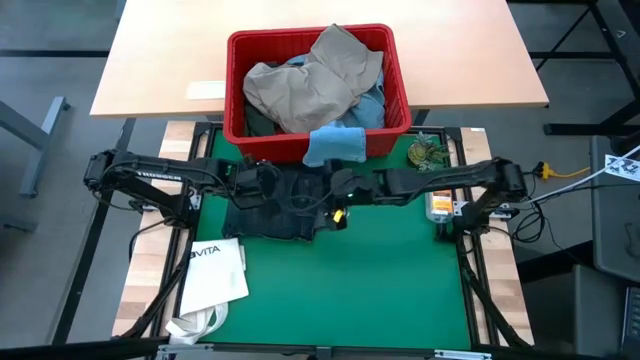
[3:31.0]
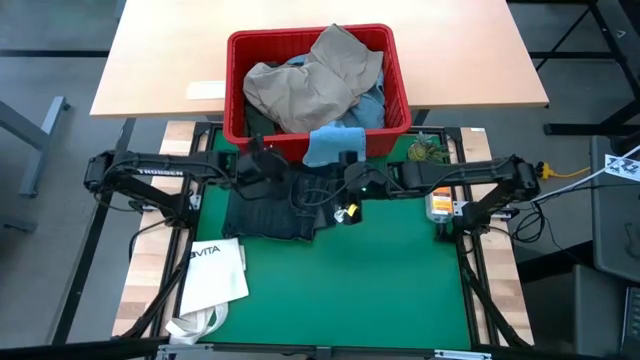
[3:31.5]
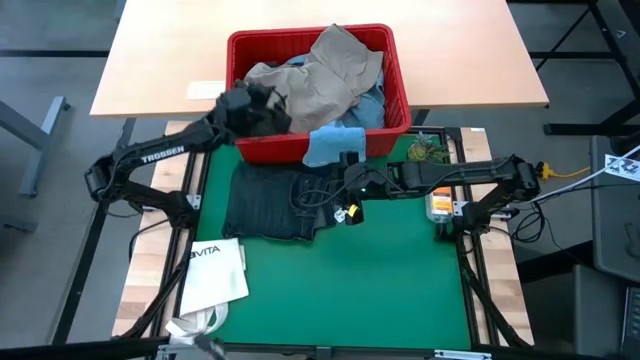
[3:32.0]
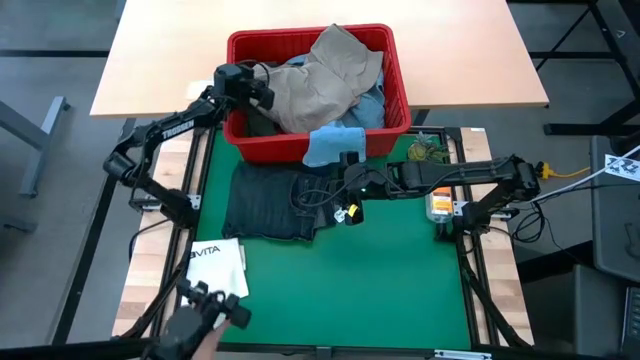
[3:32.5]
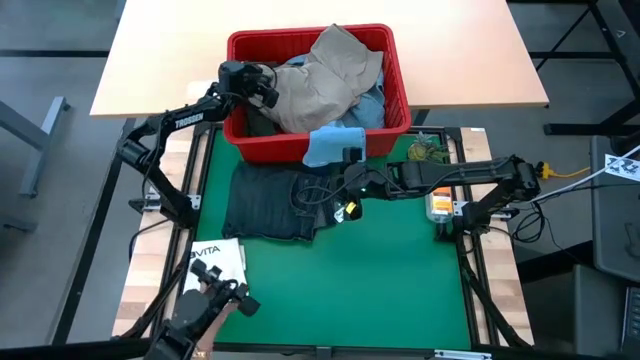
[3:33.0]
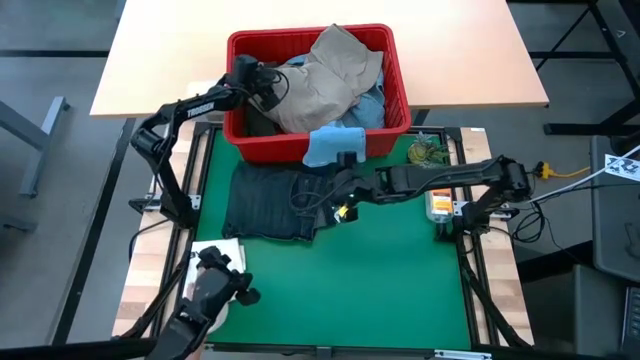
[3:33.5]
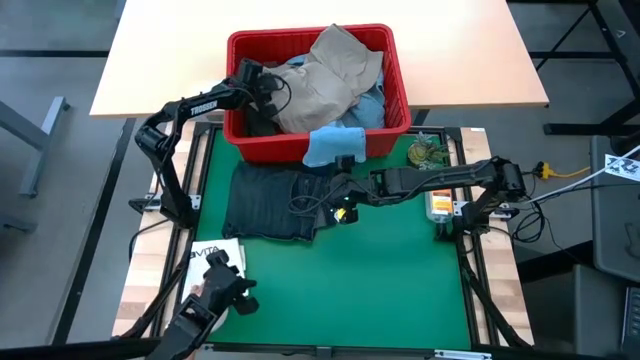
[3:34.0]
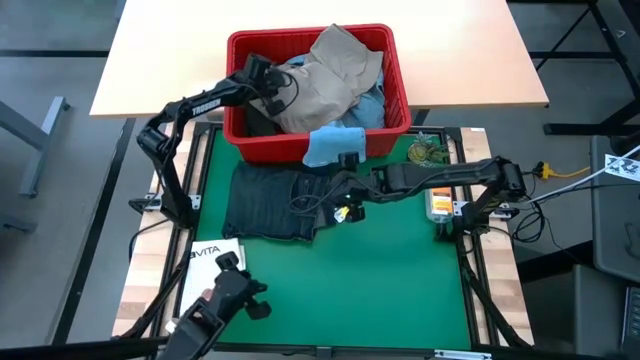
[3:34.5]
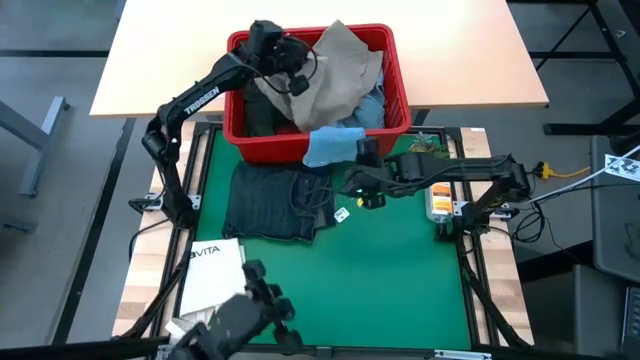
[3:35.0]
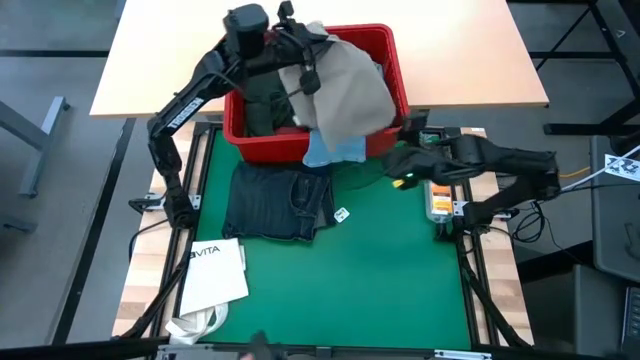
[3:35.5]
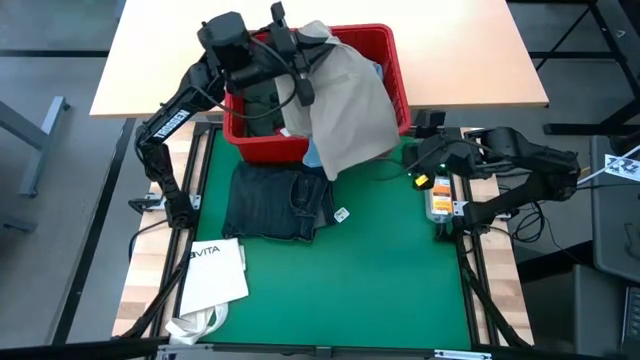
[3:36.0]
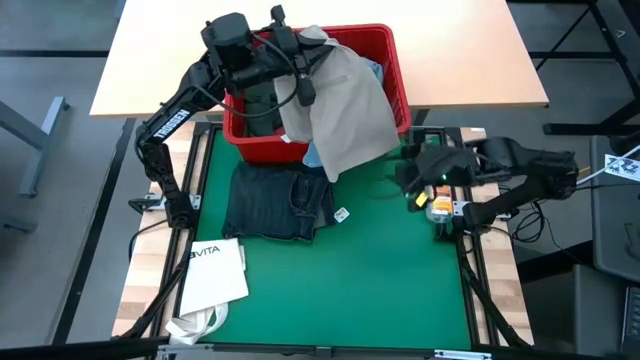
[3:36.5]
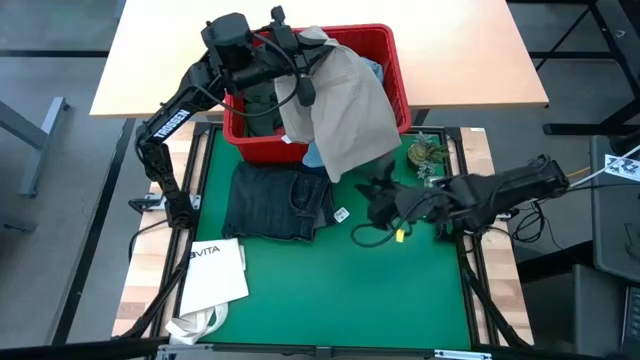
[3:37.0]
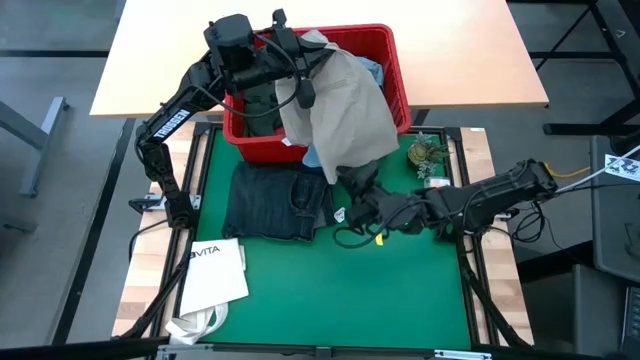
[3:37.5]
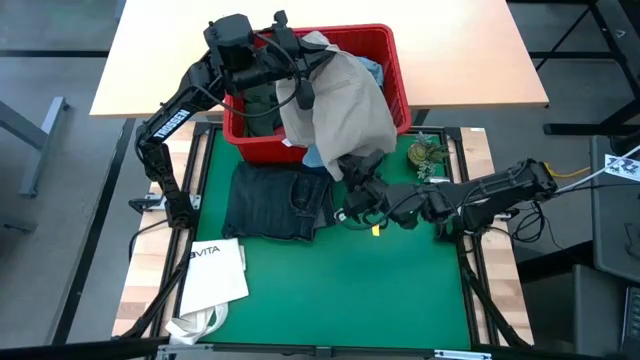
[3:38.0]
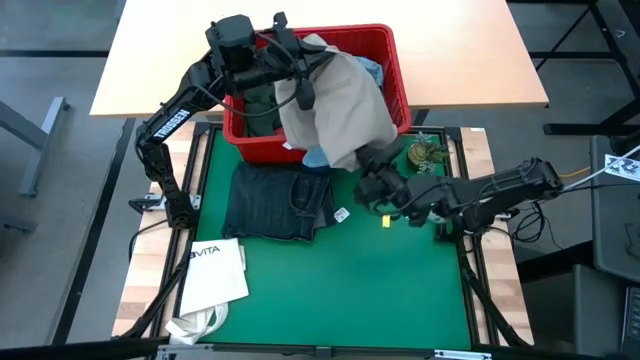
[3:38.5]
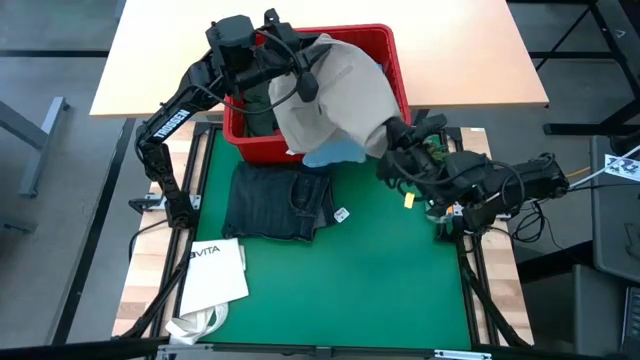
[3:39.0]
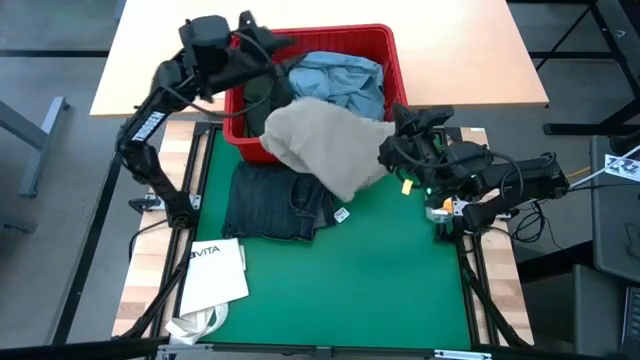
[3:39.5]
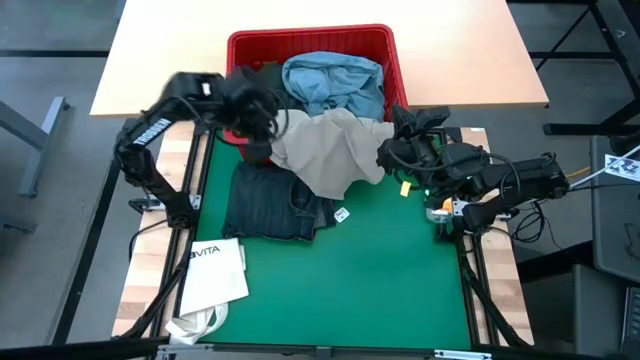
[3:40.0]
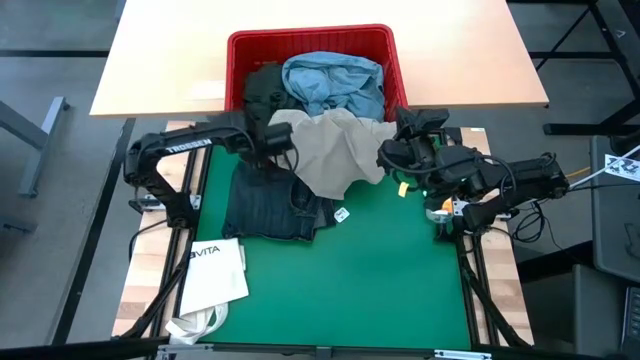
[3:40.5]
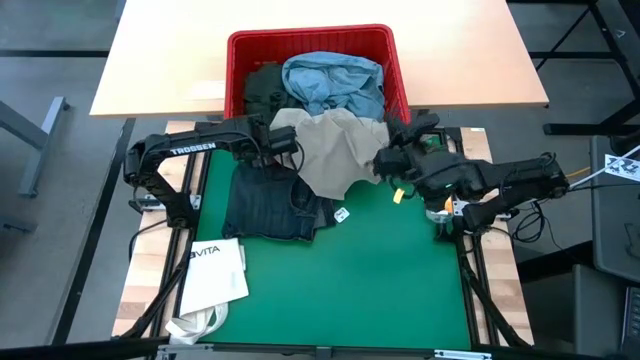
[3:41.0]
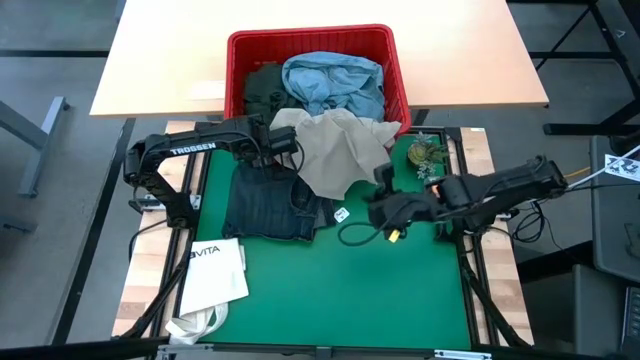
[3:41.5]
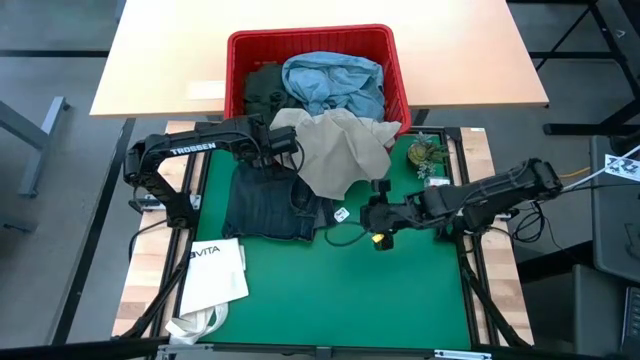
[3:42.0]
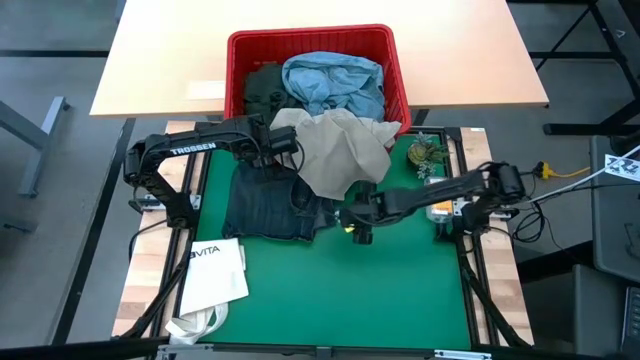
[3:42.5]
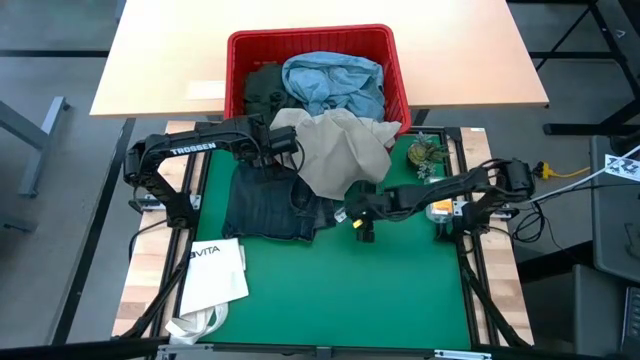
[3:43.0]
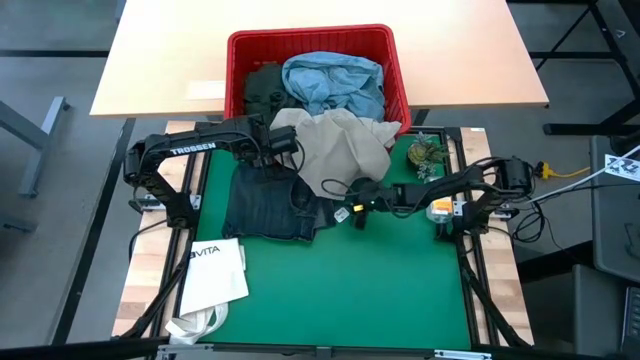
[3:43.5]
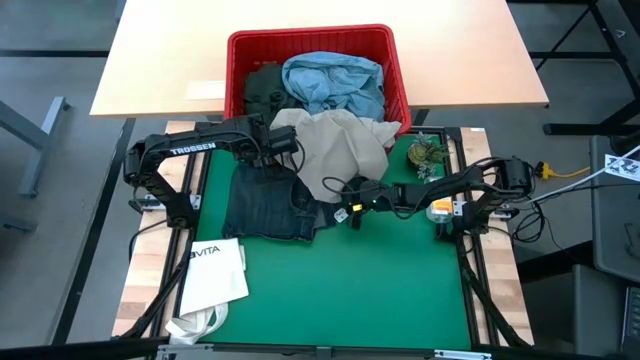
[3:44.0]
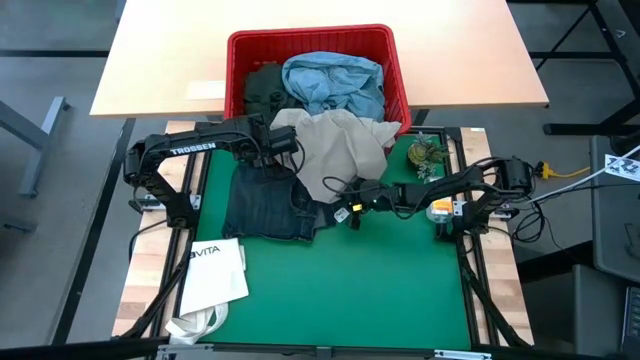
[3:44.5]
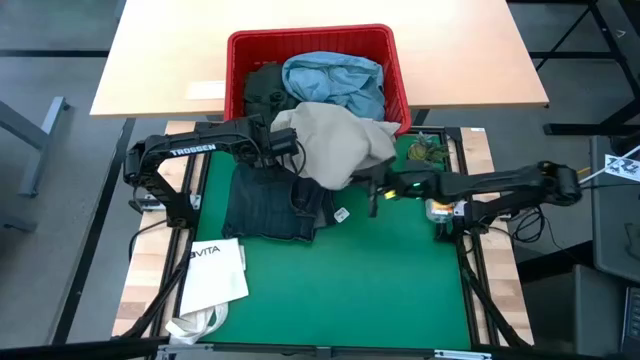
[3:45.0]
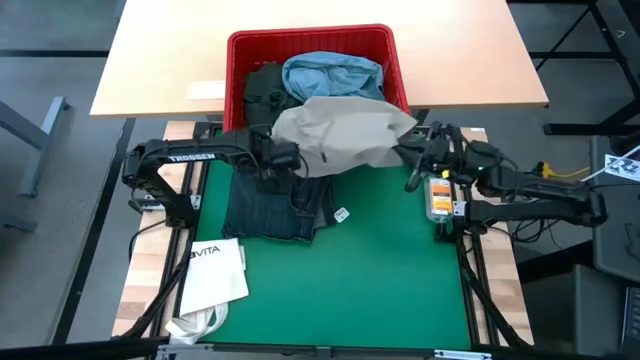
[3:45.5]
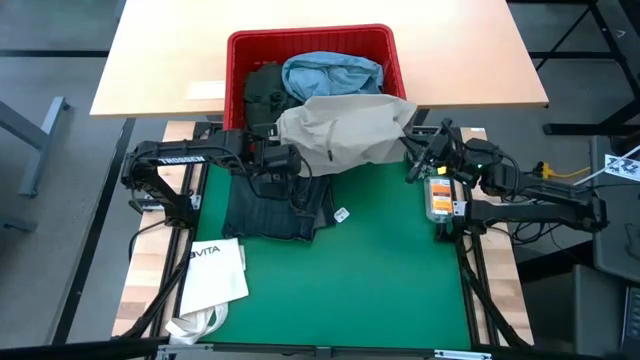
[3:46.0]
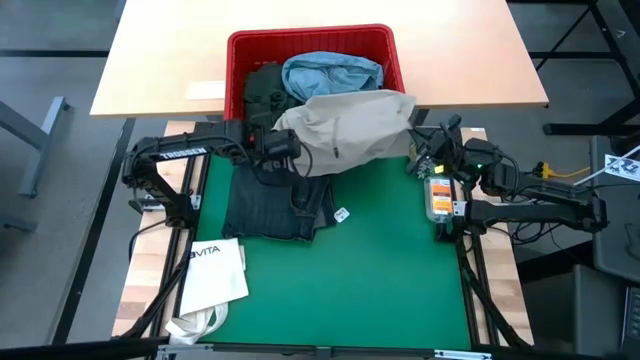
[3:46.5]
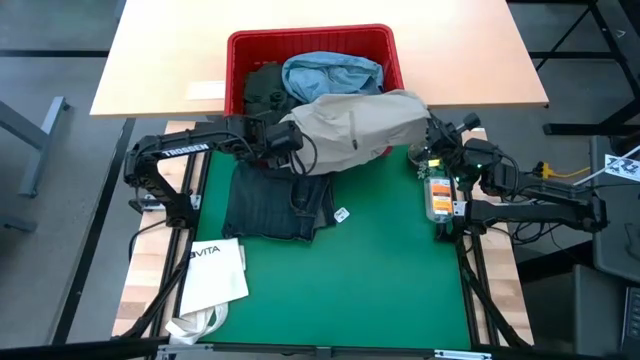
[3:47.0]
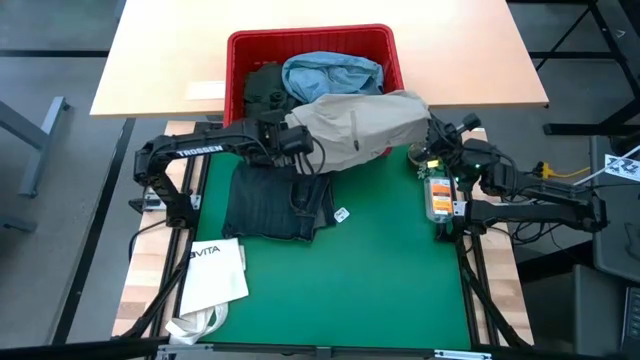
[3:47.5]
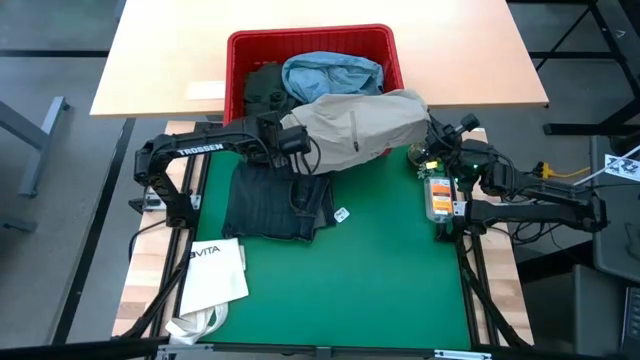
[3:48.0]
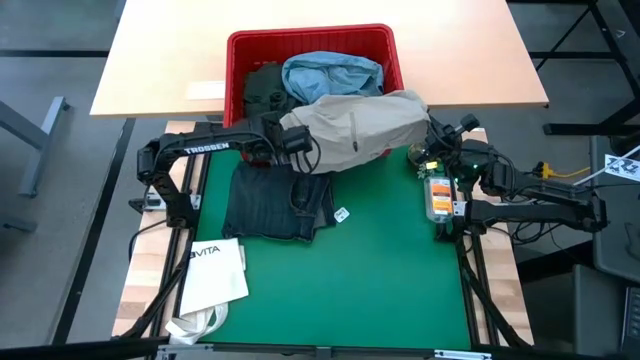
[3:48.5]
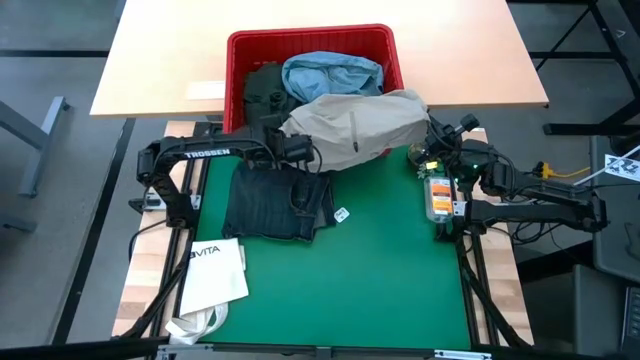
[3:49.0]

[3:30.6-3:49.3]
Task: Fold Laundry from Bin
Fold the brown shorts

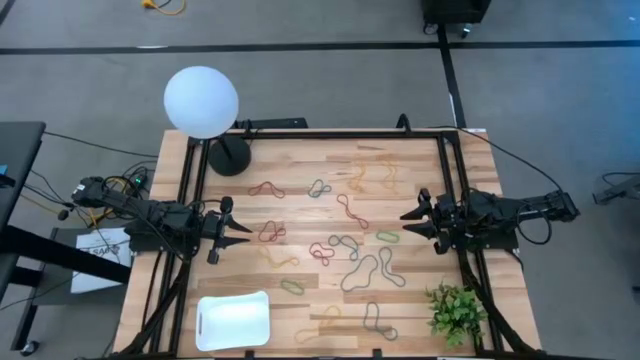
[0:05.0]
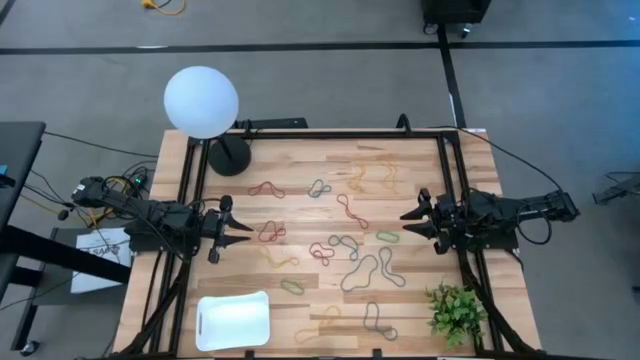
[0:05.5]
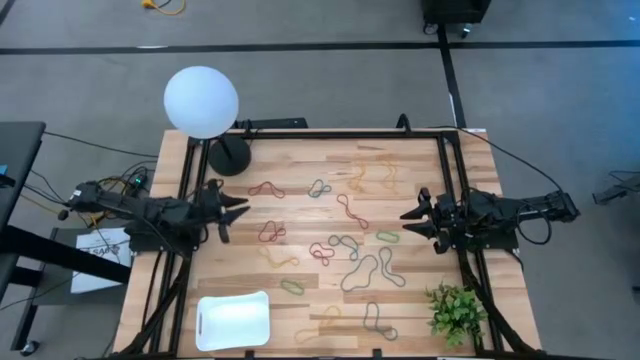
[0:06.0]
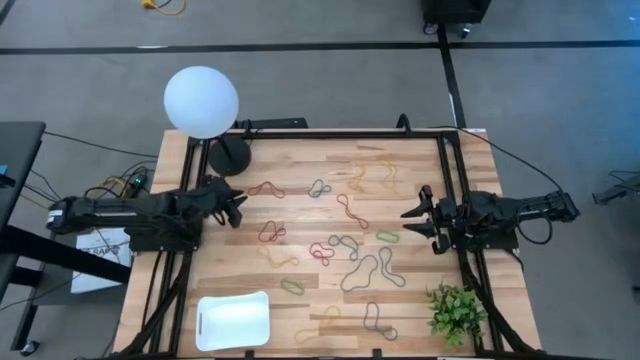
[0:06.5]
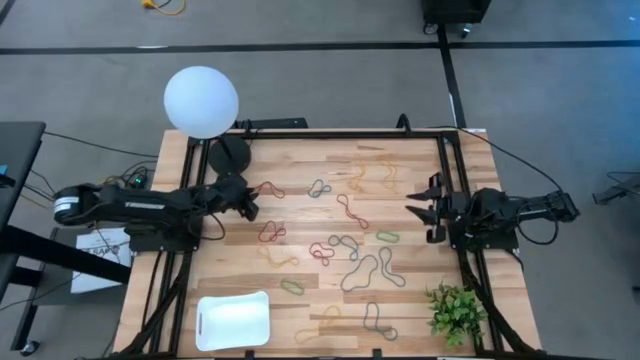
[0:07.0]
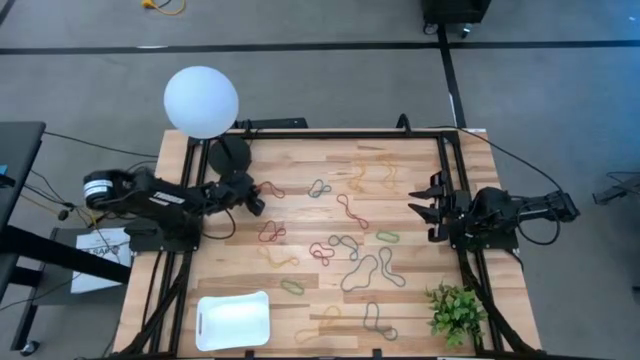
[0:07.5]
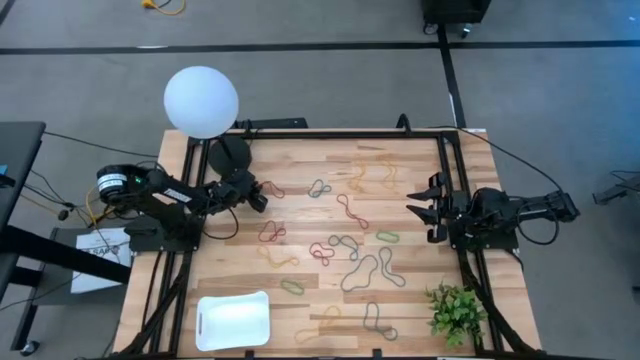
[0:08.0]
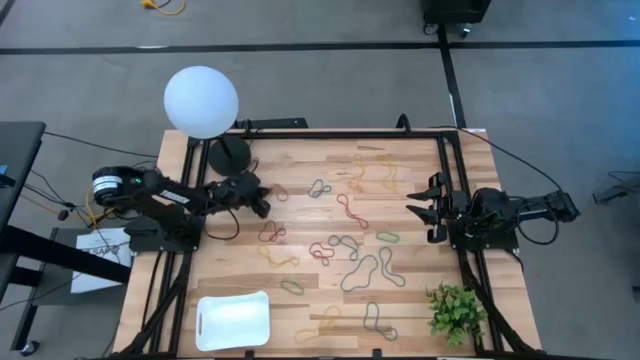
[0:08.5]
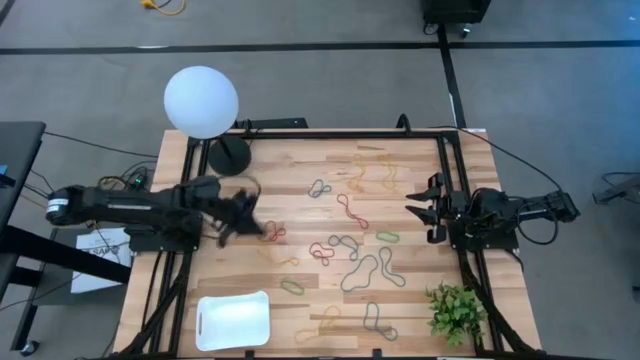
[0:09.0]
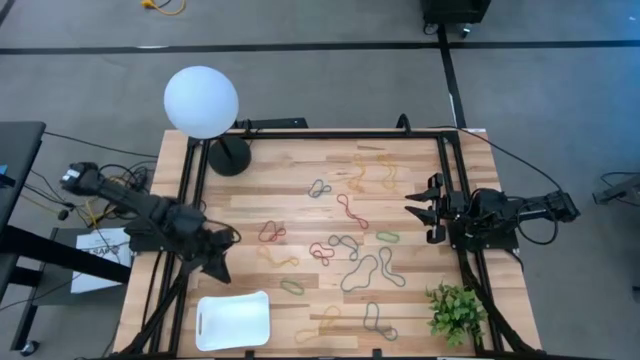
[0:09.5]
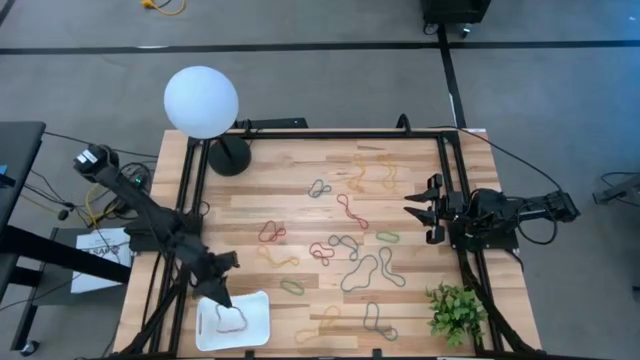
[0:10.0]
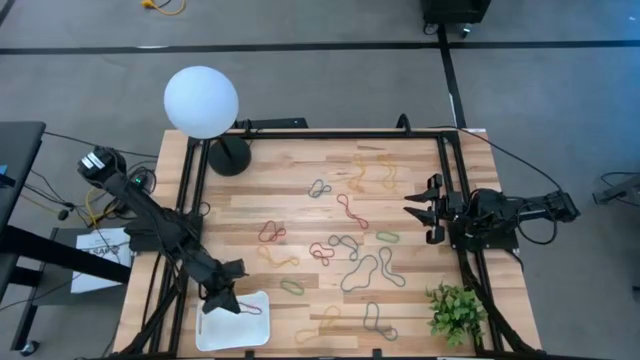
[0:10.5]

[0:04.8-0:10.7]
Task: Pick and place items into bin
Put the red rubber band into the bin
